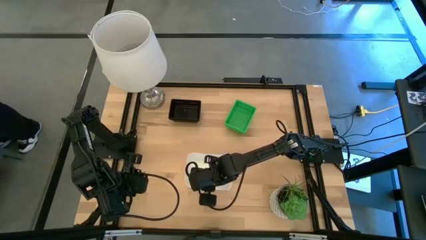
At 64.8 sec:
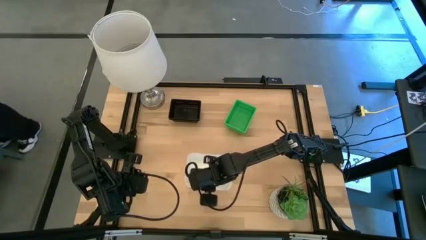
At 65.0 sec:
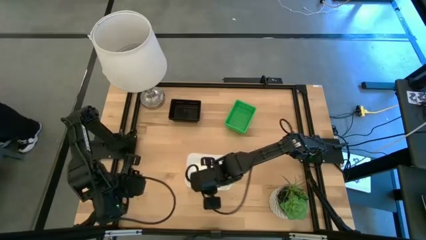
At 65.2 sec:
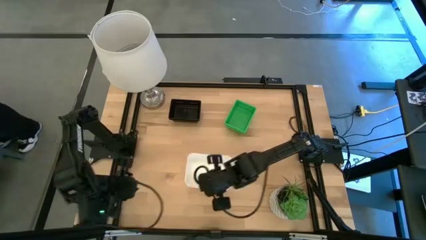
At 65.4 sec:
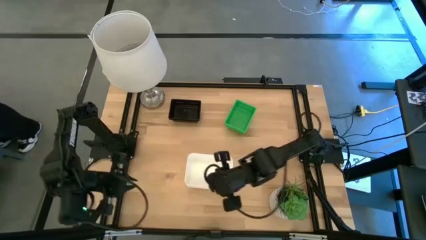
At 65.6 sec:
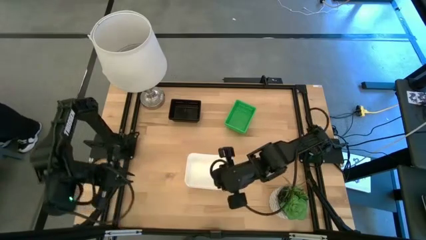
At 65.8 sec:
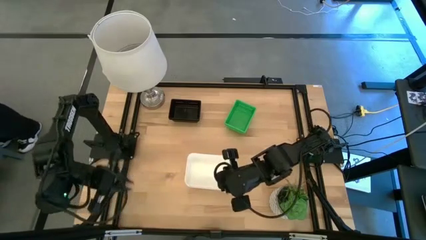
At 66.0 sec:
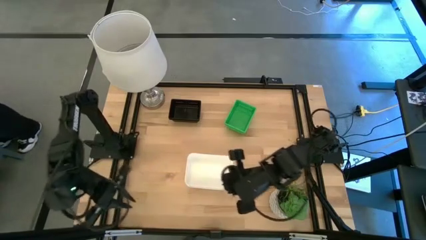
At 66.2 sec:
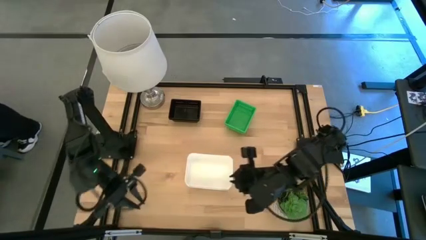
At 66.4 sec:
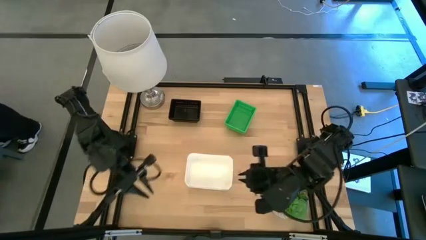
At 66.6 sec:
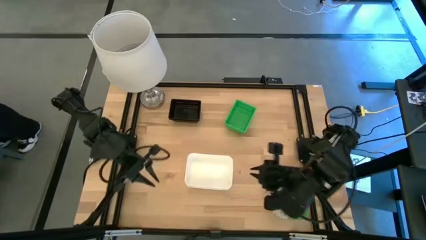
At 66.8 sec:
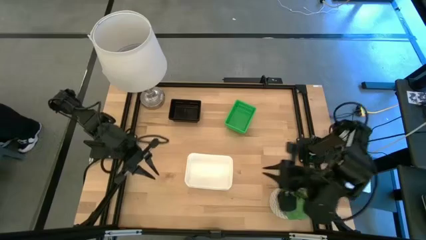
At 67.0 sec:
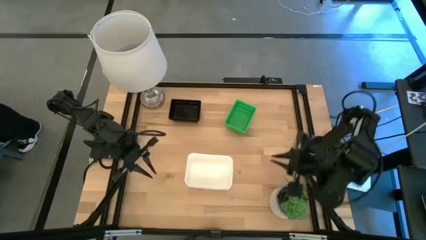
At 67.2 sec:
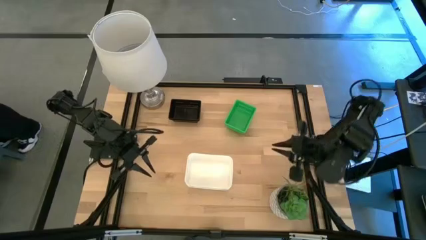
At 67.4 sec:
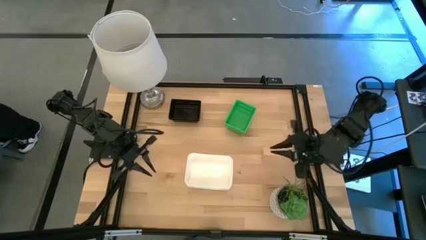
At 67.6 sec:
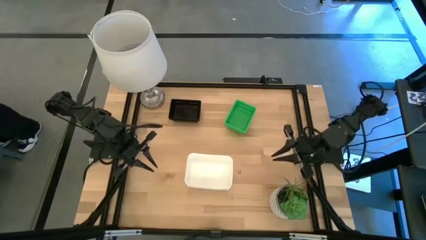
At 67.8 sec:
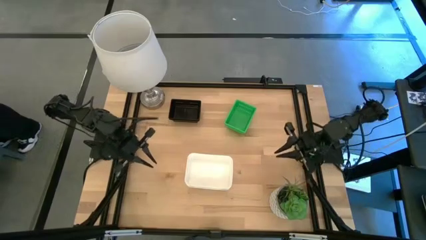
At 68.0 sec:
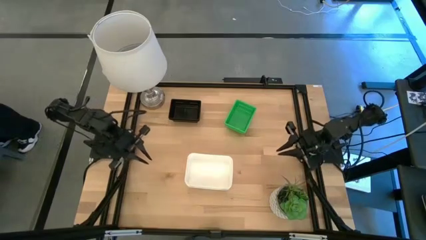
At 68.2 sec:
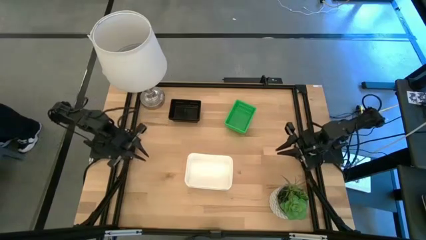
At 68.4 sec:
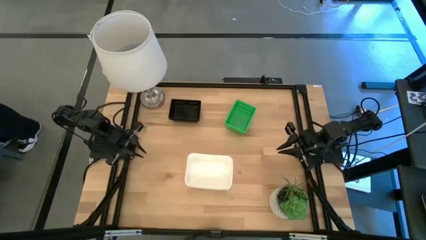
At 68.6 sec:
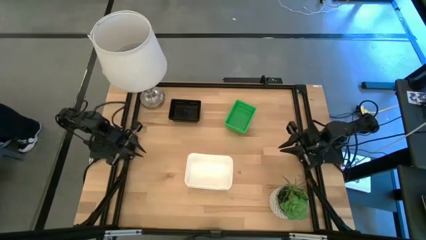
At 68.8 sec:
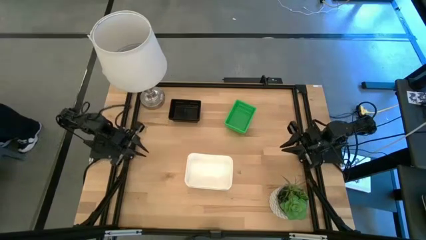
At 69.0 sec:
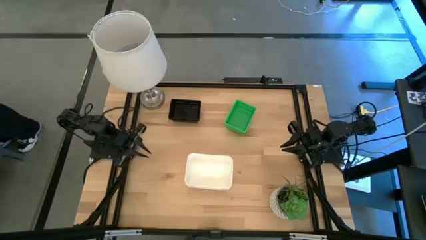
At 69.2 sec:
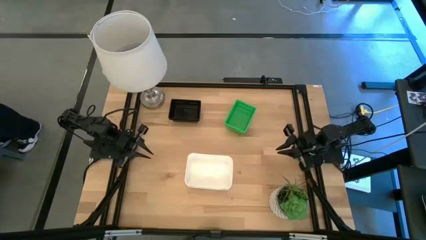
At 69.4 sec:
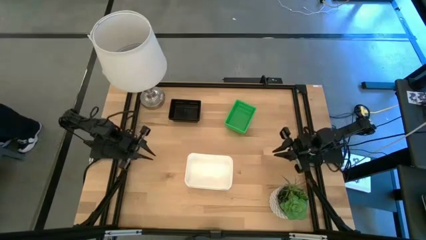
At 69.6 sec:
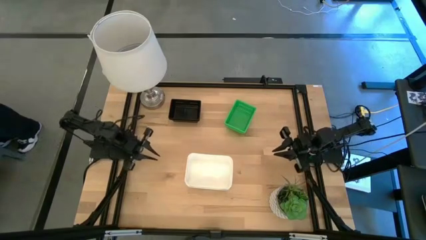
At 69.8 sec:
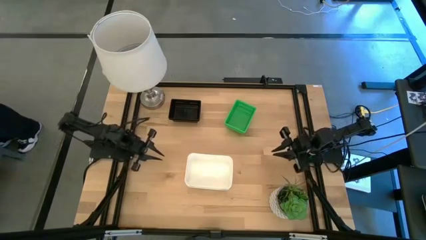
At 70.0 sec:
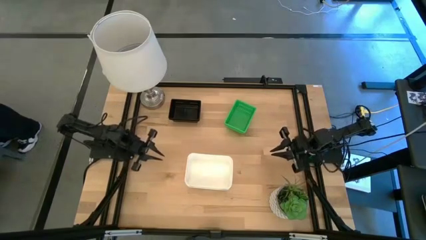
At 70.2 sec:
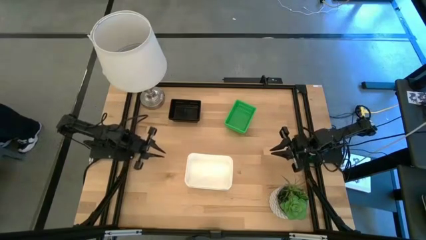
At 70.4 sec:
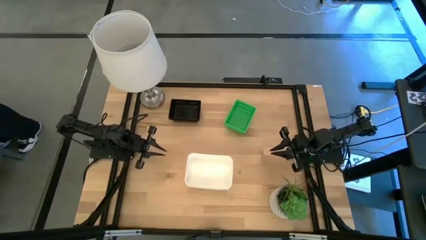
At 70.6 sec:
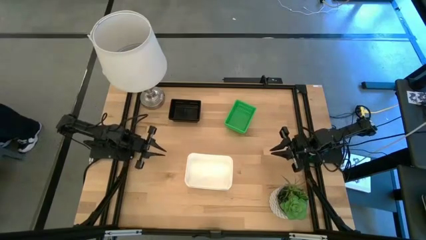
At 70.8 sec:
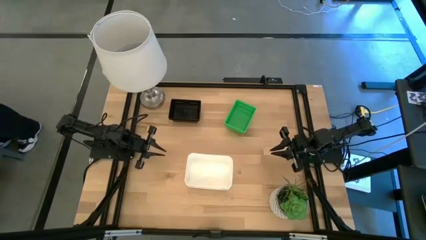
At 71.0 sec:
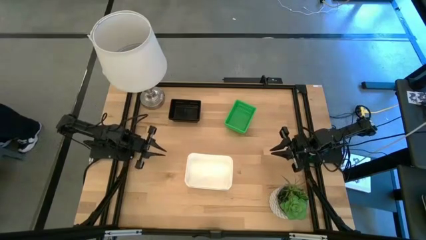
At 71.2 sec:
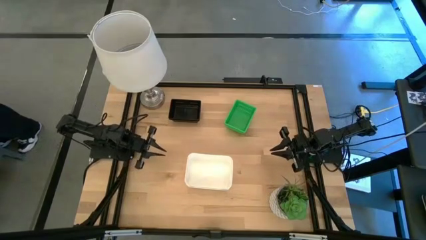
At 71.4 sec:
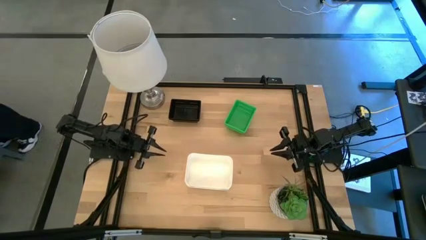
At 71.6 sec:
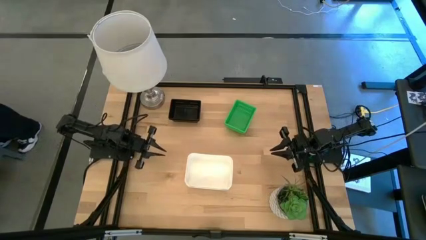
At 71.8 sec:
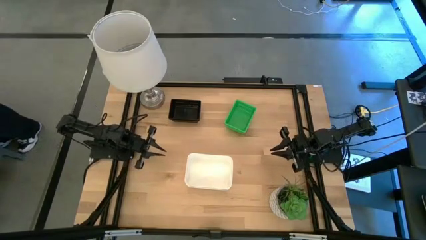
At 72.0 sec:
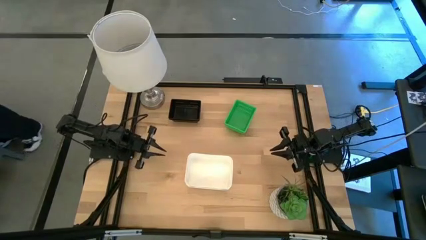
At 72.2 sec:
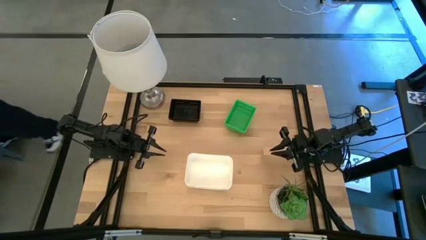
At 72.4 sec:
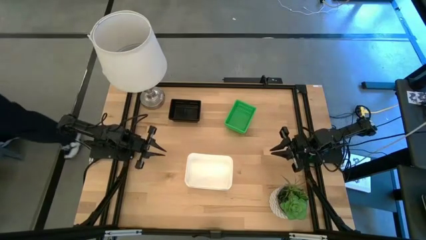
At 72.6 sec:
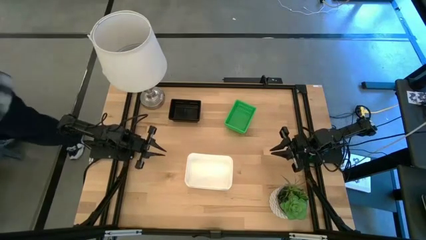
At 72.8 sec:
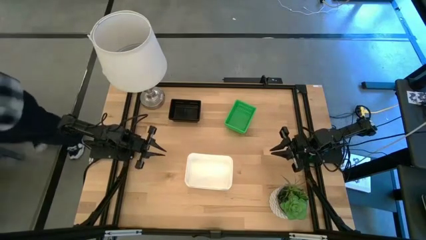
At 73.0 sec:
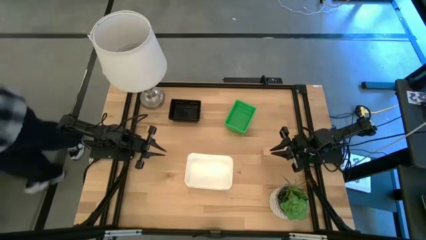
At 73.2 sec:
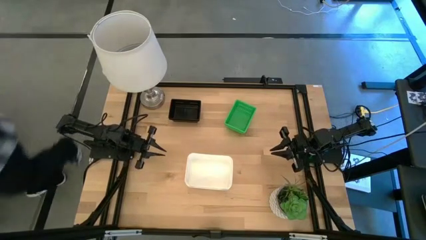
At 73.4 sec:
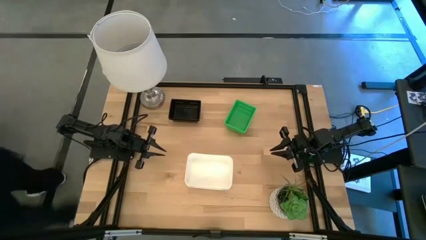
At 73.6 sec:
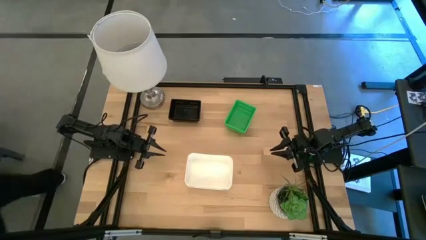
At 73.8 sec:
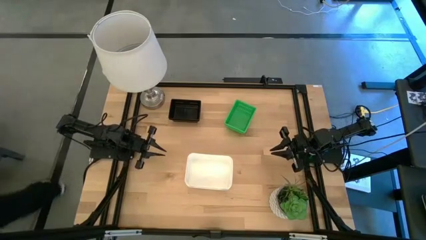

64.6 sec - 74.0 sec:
Return to Home Position
